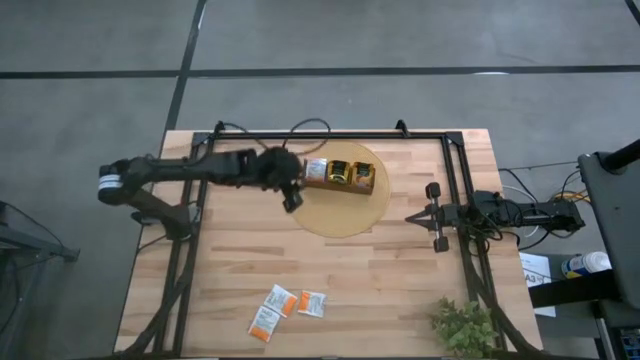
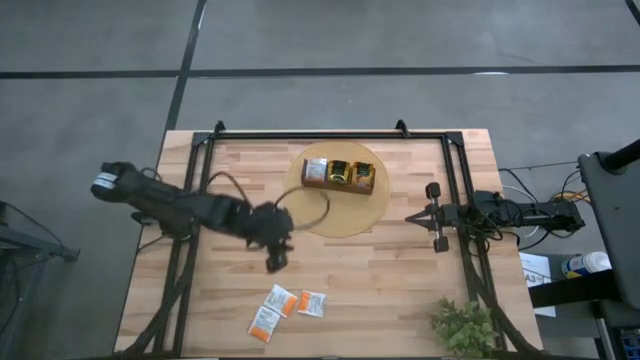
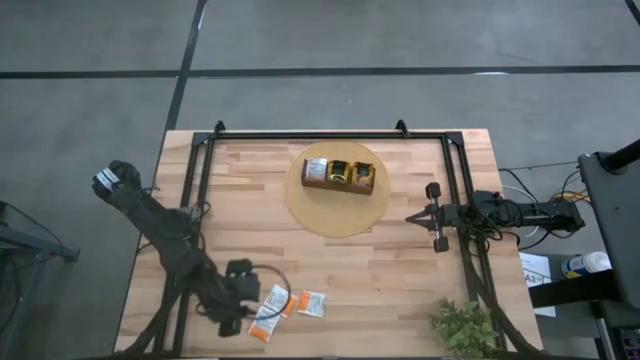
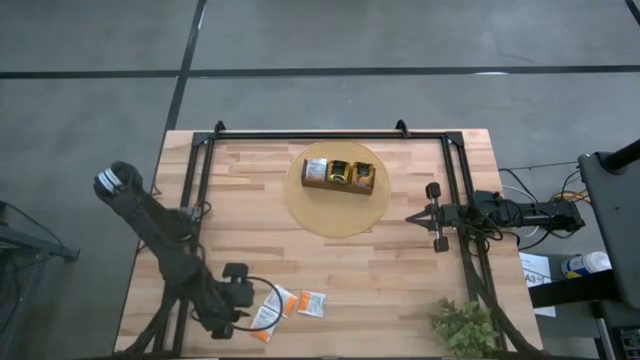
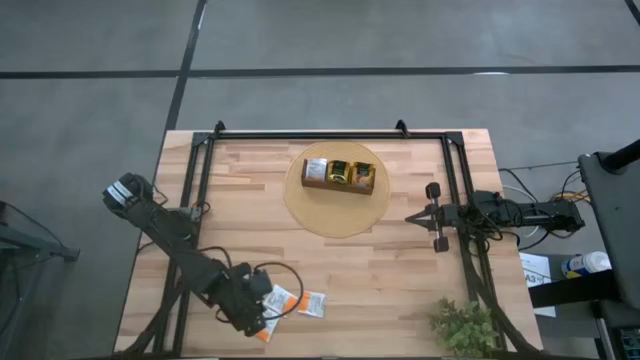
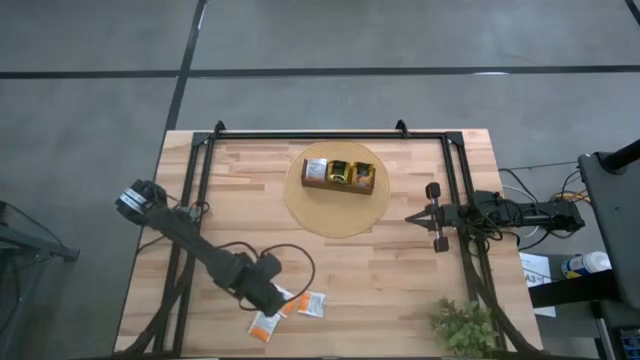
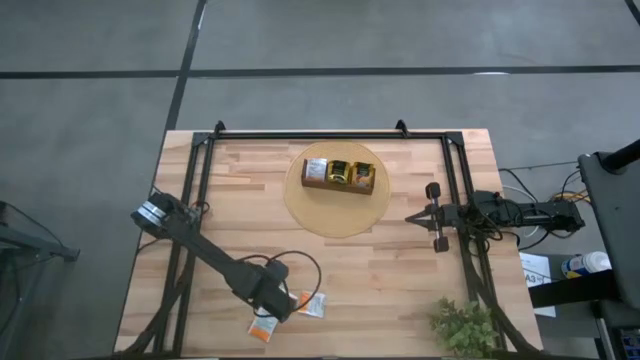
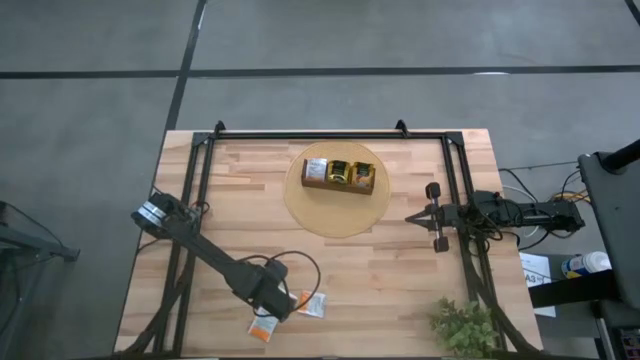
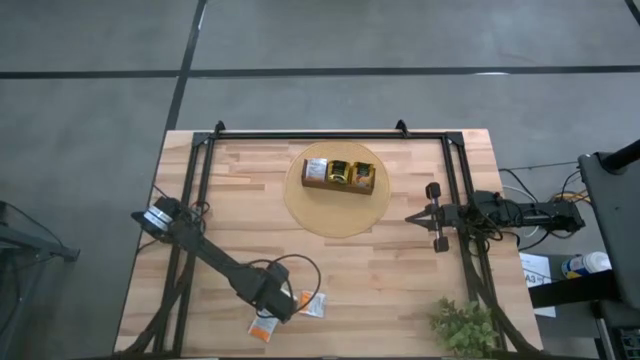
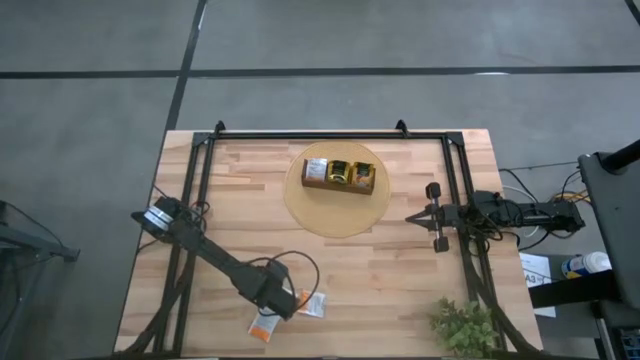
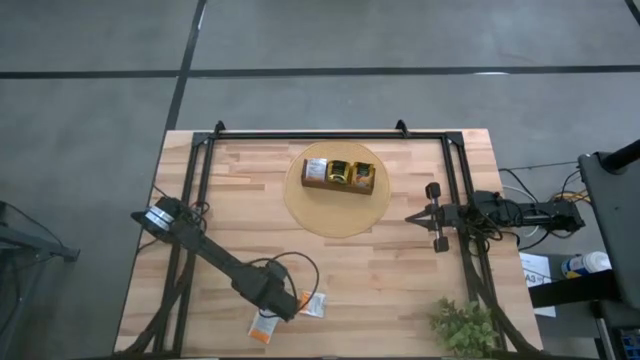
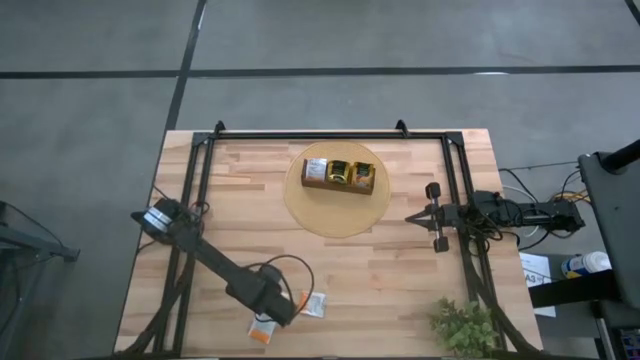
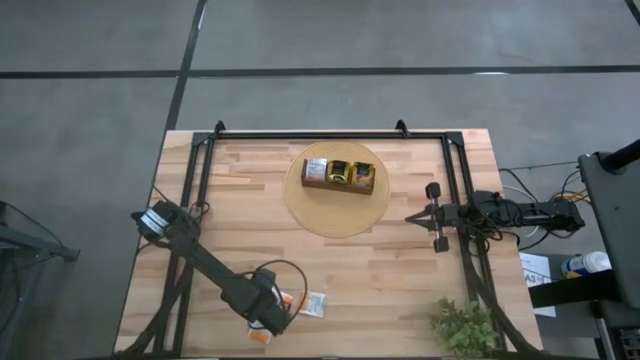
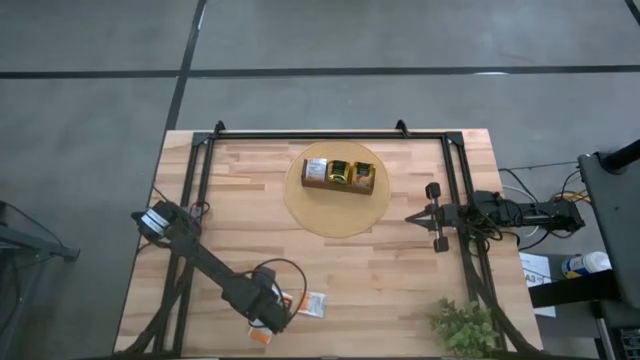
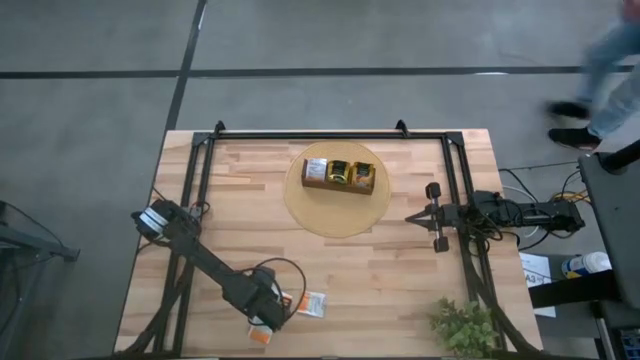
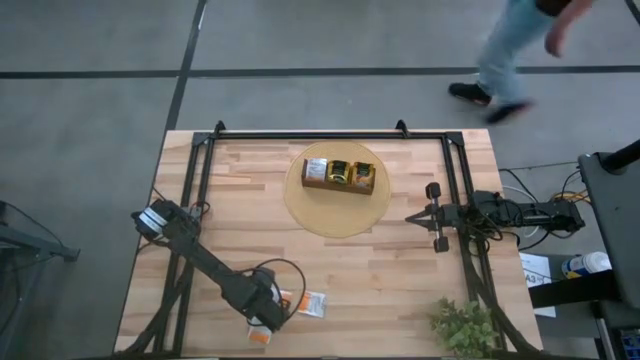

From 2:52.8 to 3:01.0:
Task: Pick & Place Tea
Put the top left white tea bag into the left section of wooden organizer

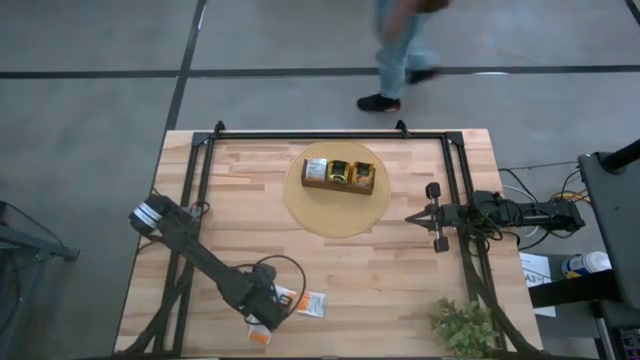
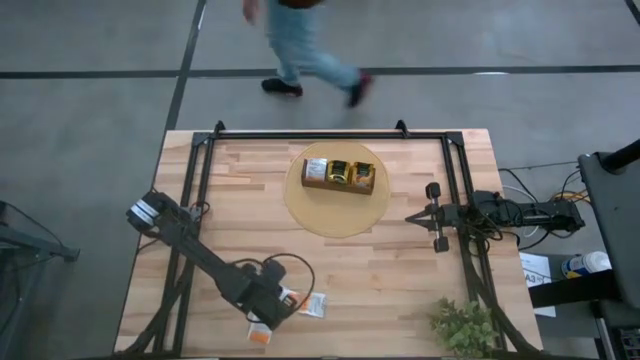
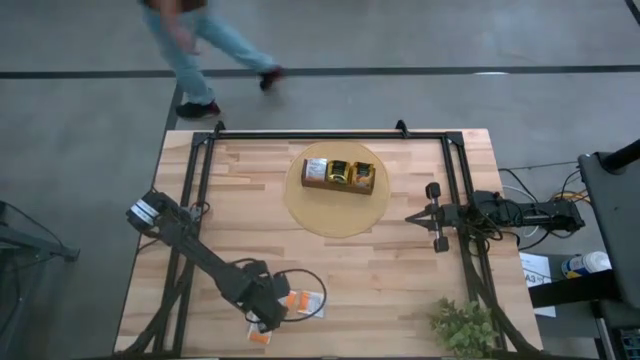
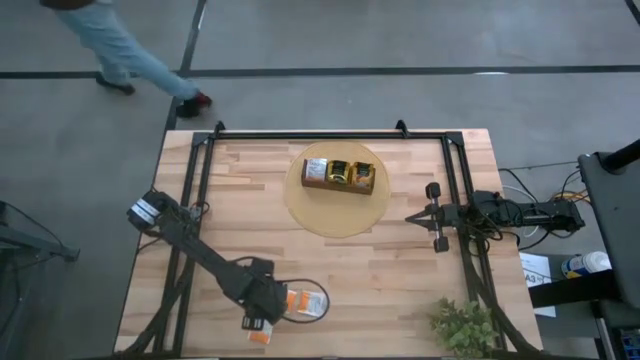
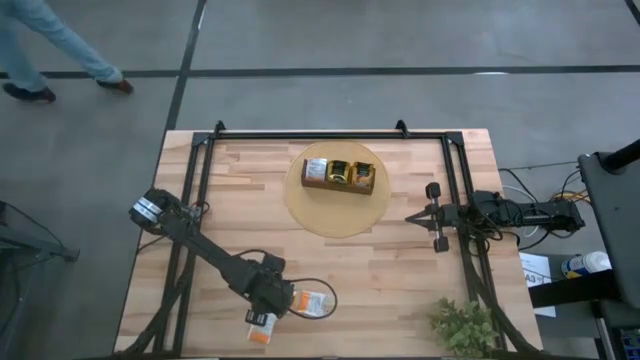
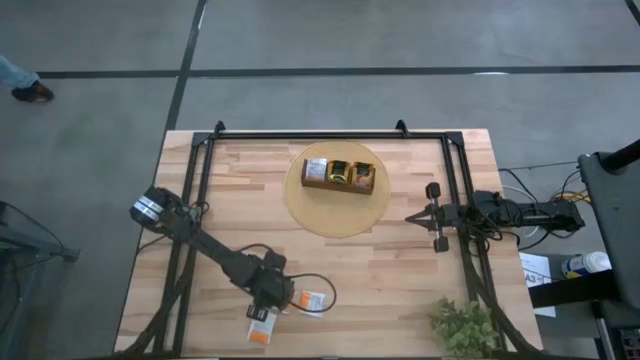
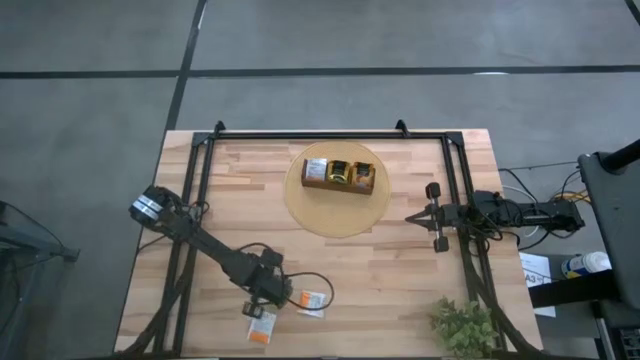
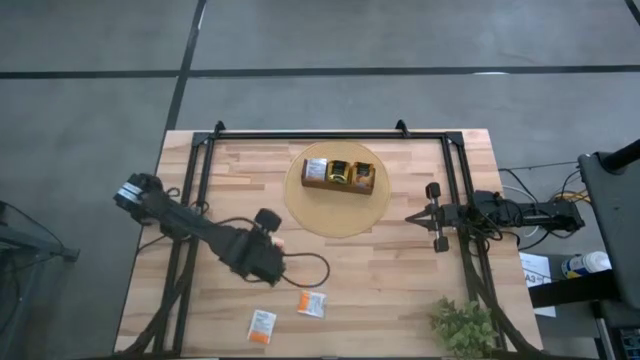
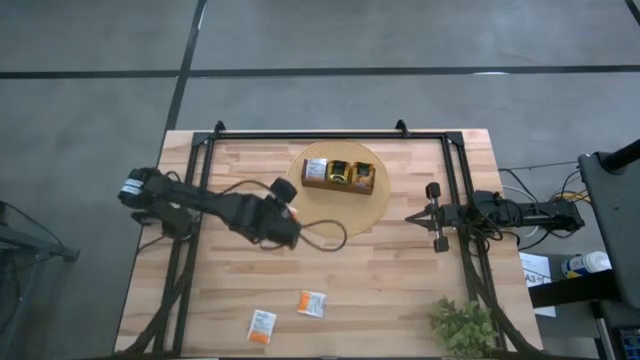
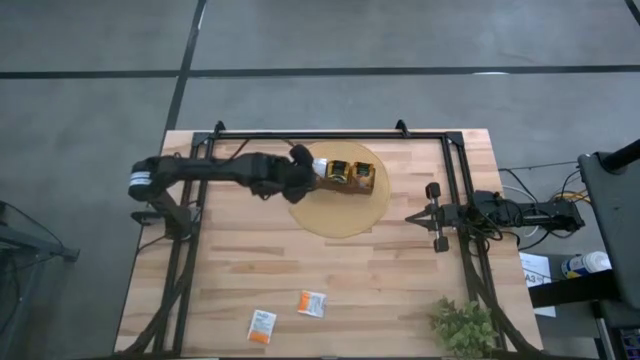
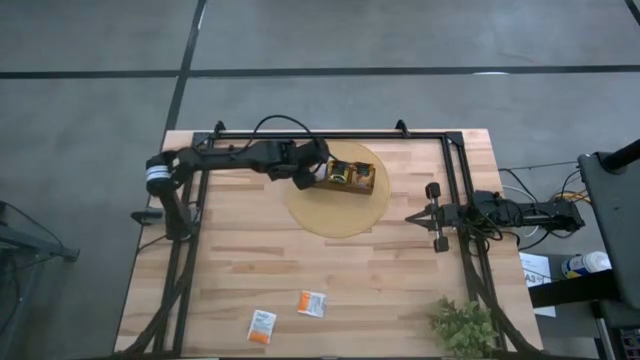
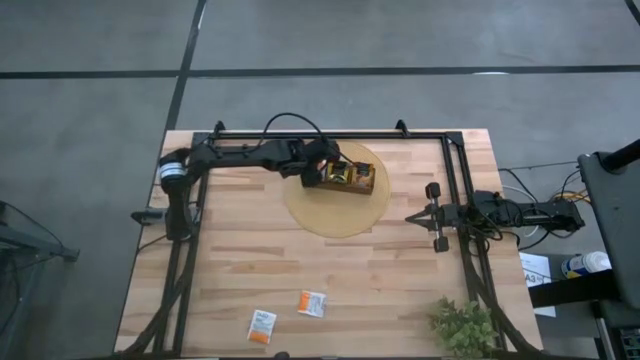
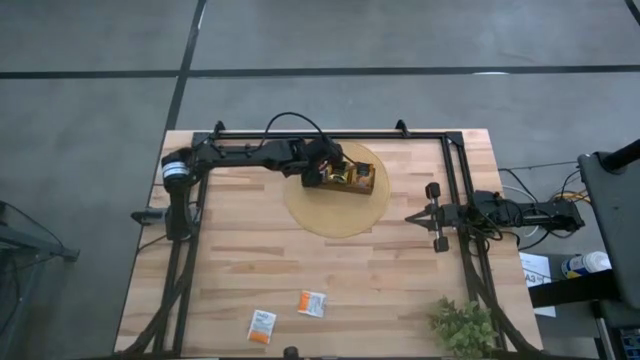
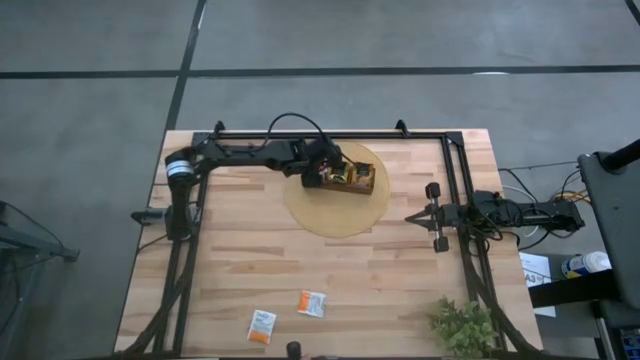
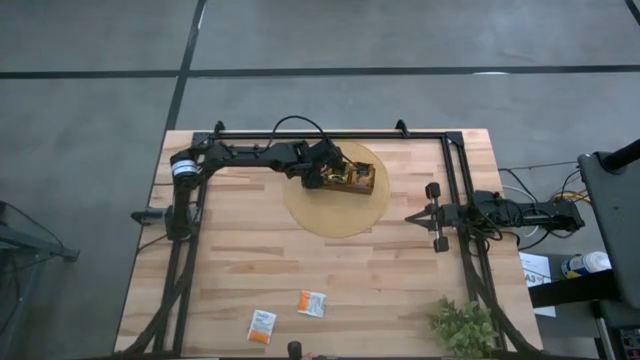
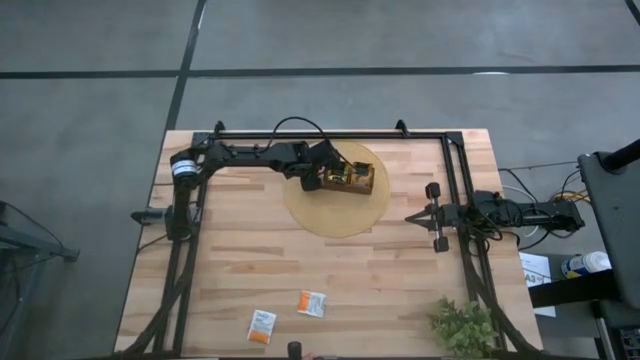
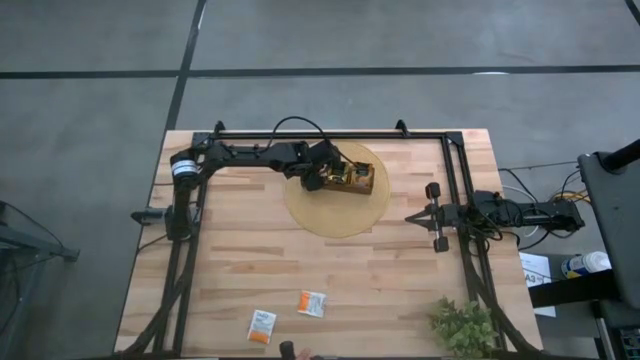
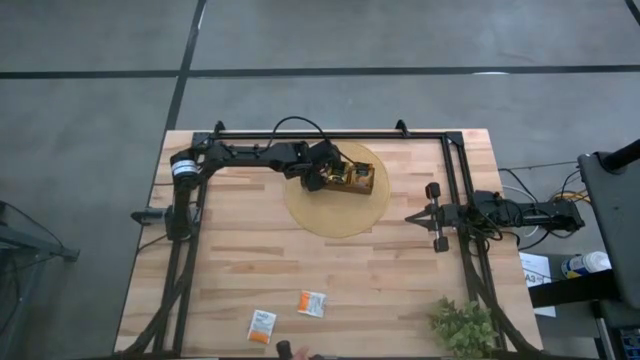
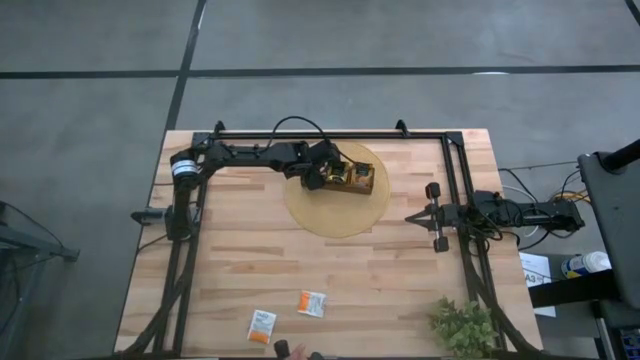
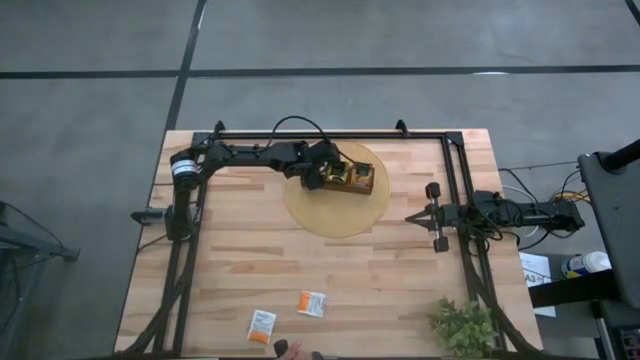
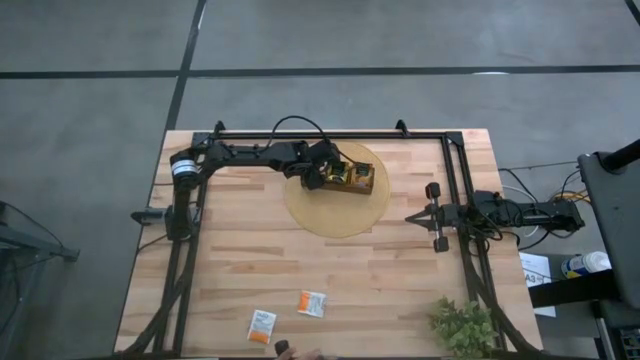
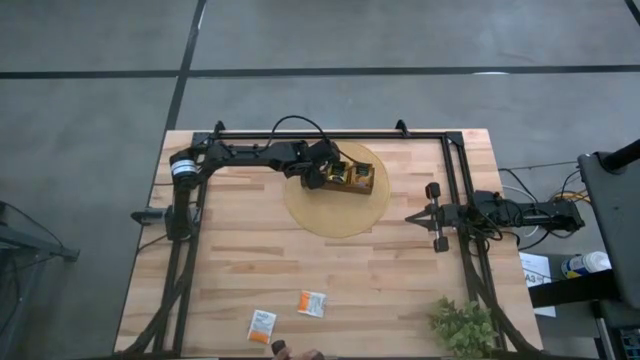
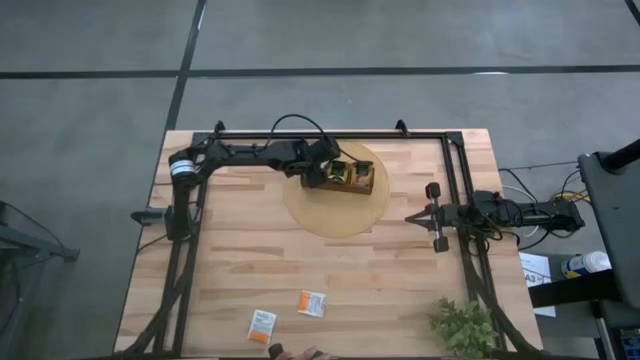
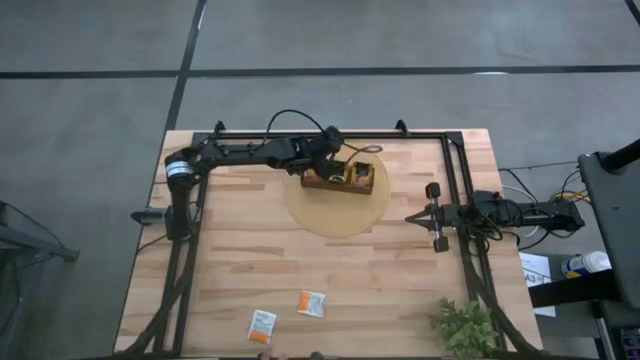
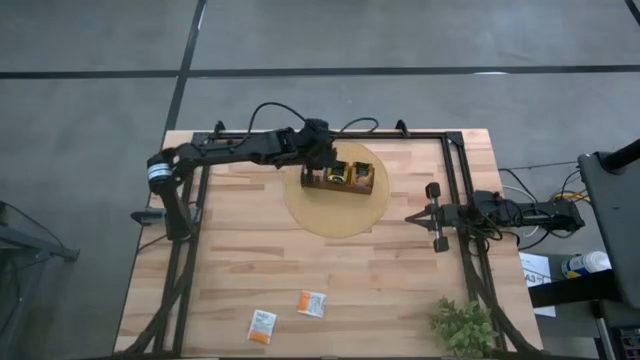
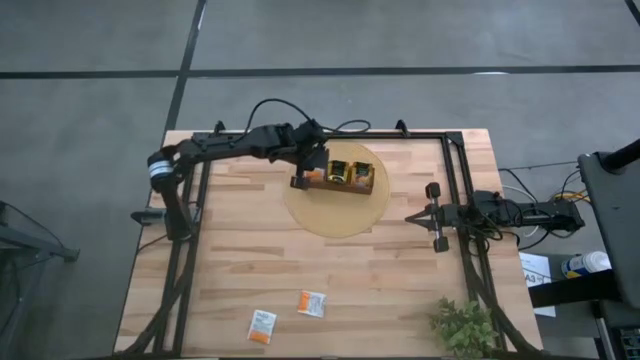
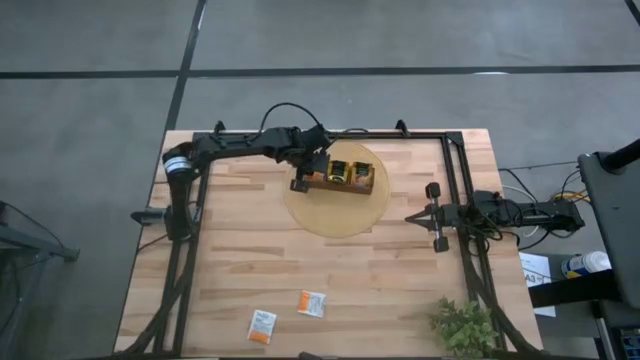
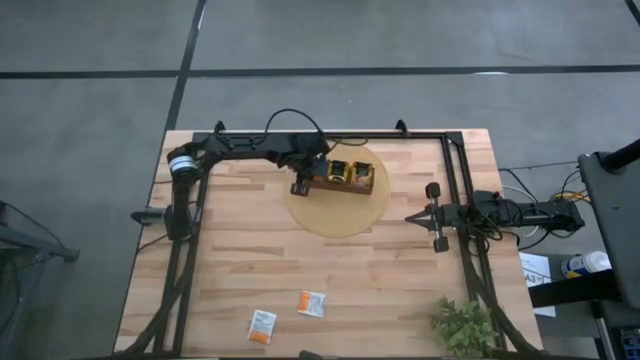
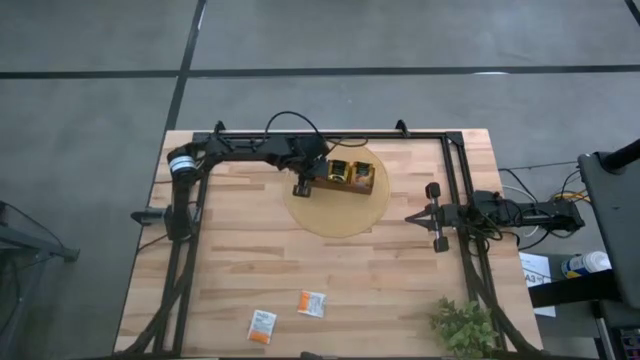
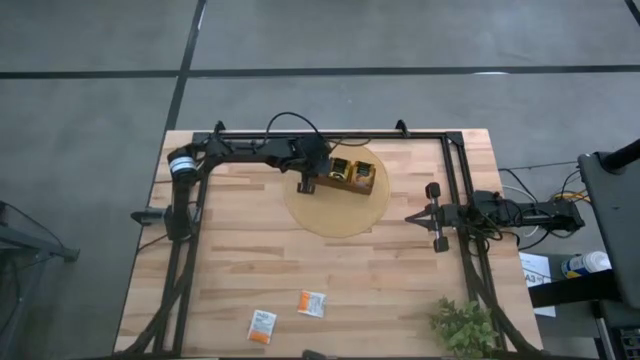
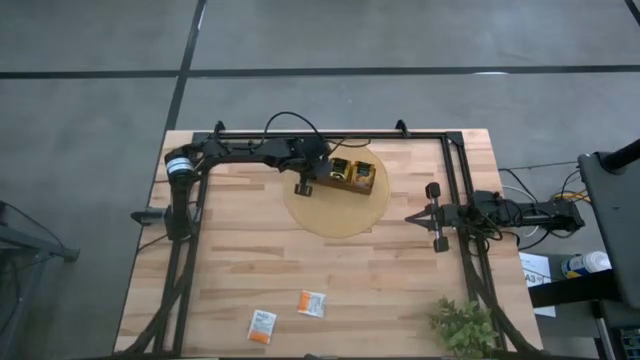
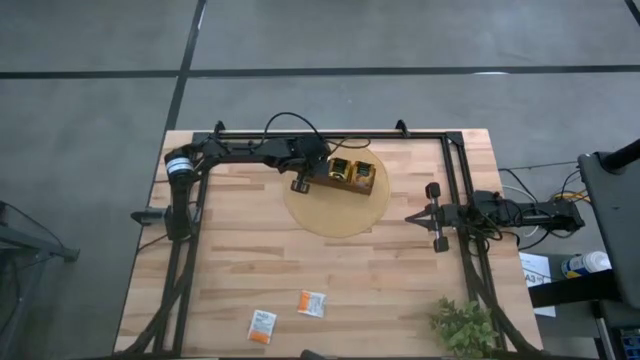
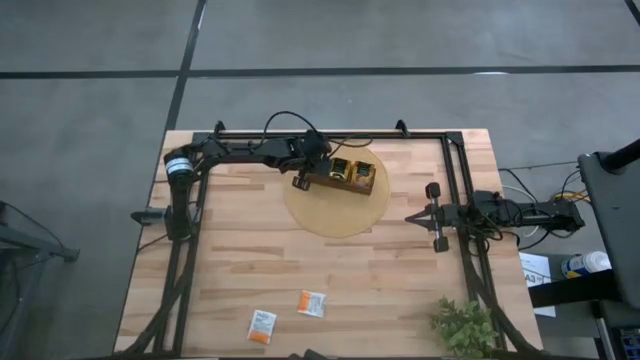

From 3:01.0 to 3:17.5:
Put the top left white tea bag into the left section of wooden organizer
